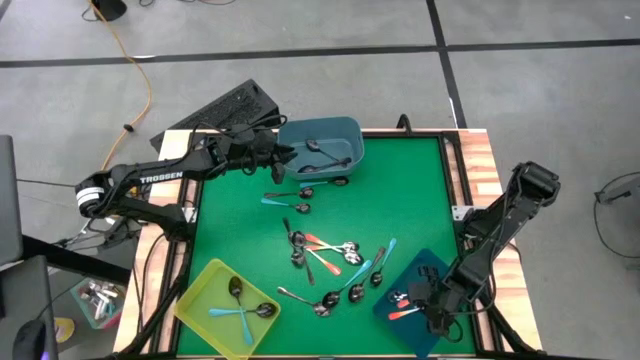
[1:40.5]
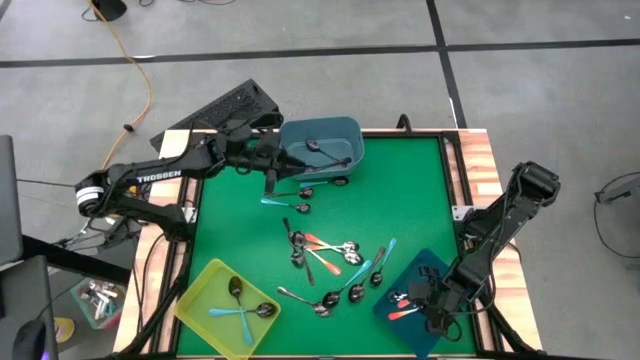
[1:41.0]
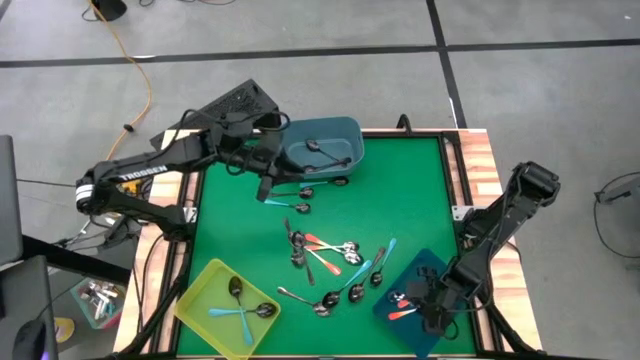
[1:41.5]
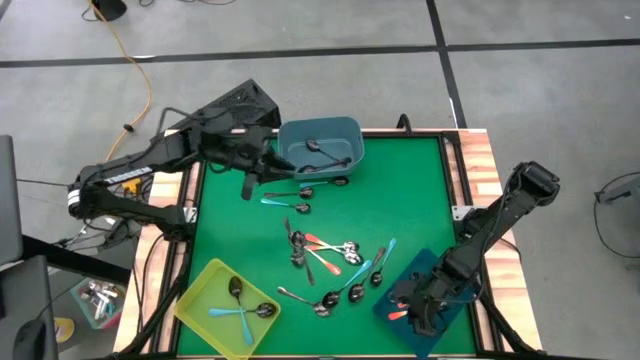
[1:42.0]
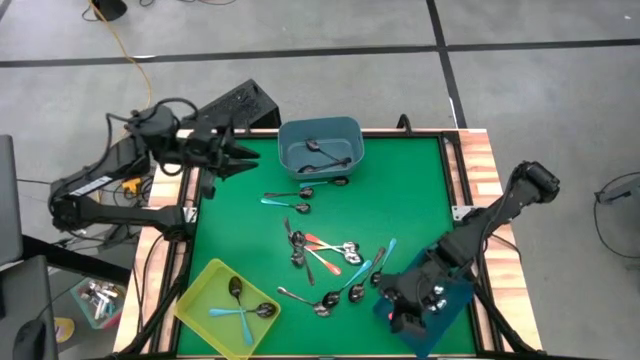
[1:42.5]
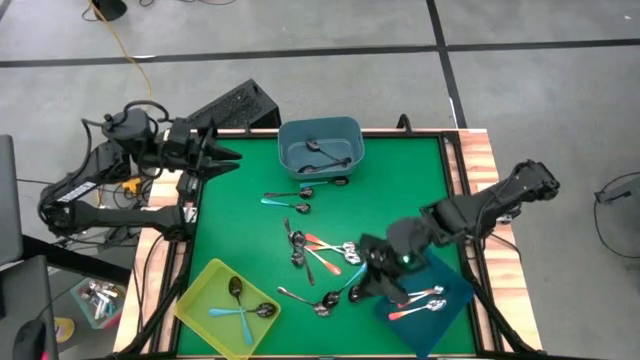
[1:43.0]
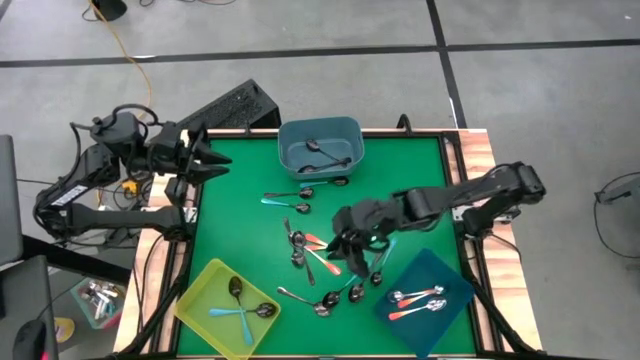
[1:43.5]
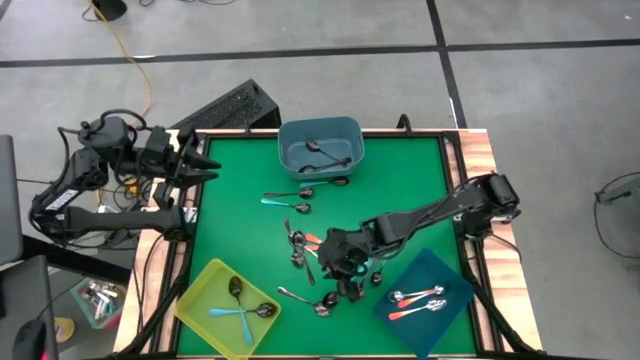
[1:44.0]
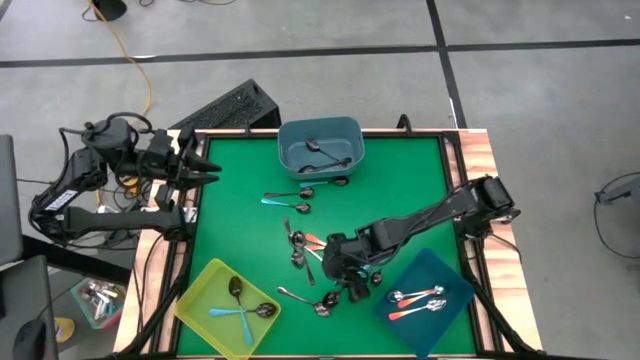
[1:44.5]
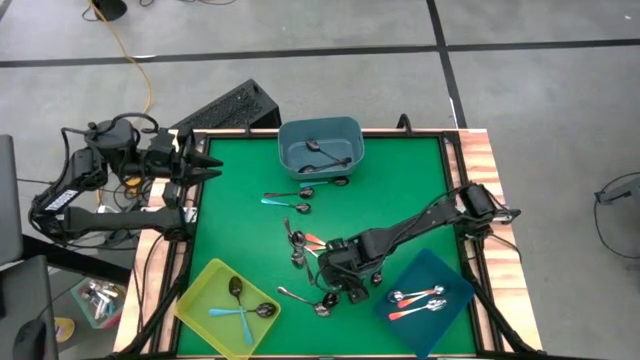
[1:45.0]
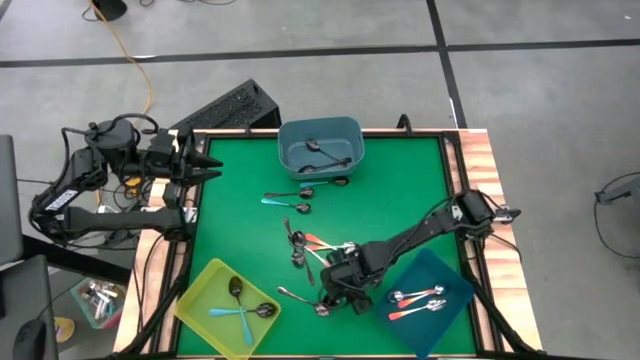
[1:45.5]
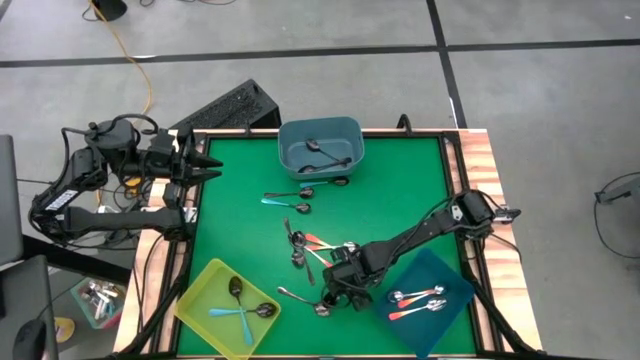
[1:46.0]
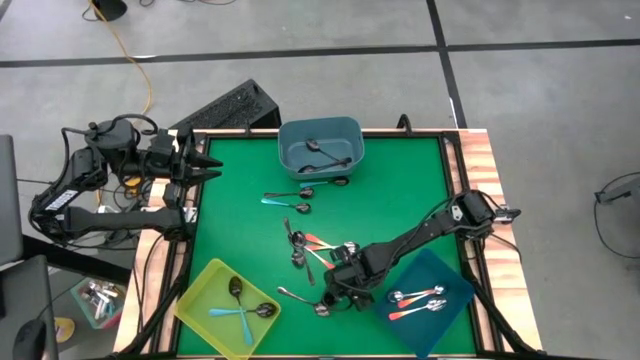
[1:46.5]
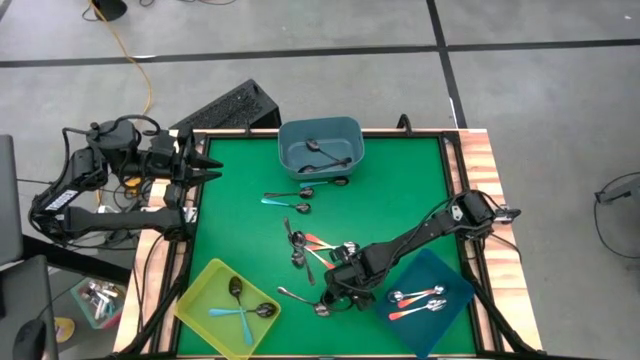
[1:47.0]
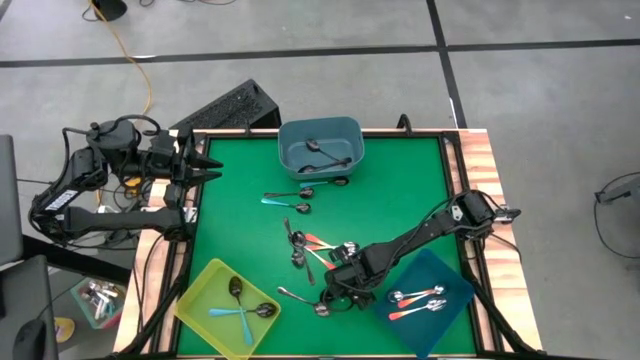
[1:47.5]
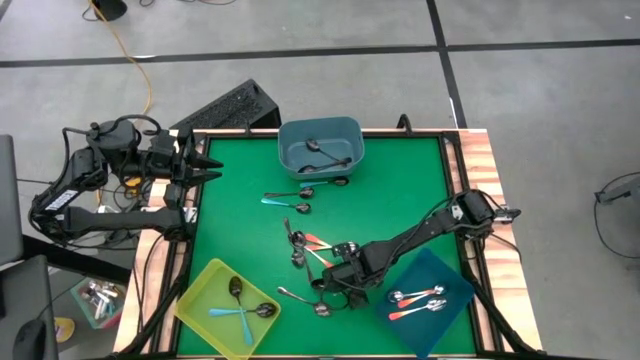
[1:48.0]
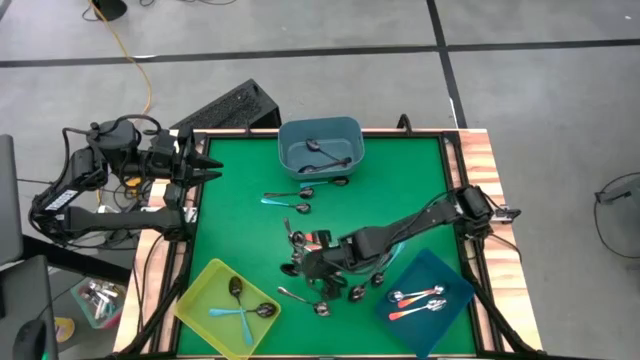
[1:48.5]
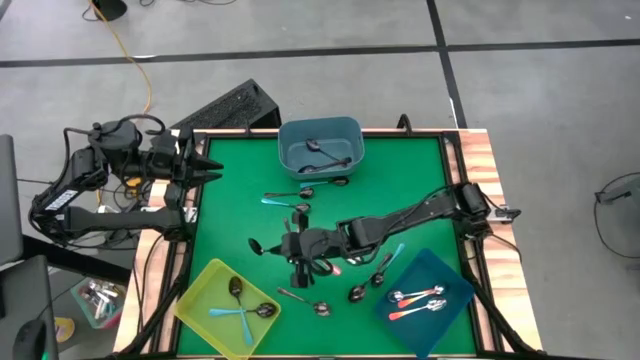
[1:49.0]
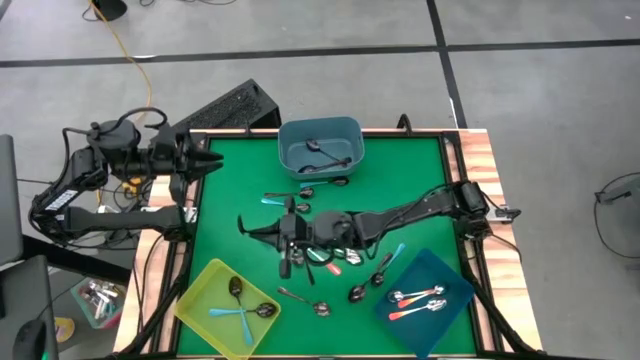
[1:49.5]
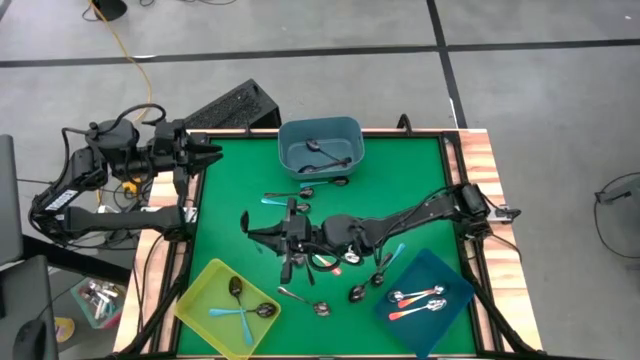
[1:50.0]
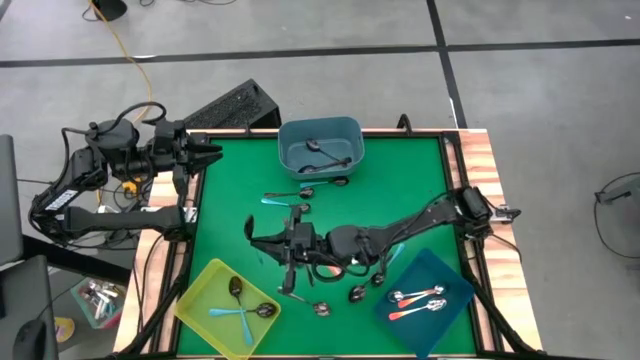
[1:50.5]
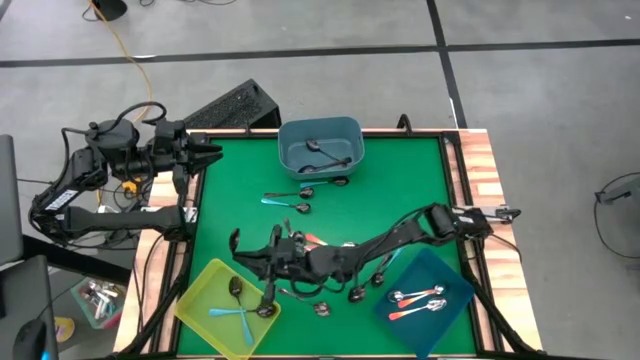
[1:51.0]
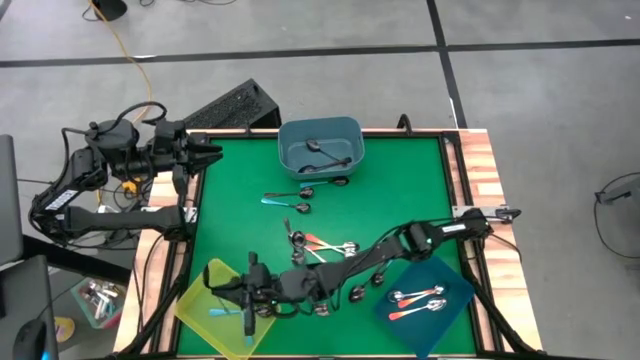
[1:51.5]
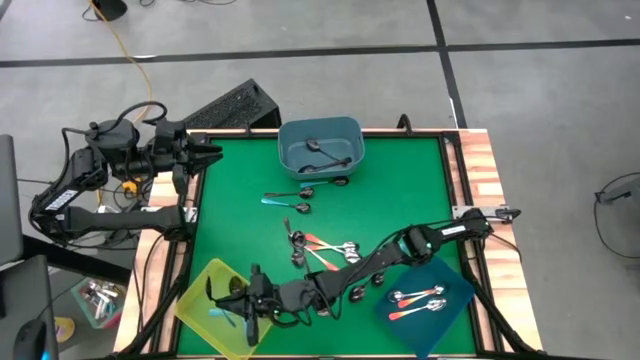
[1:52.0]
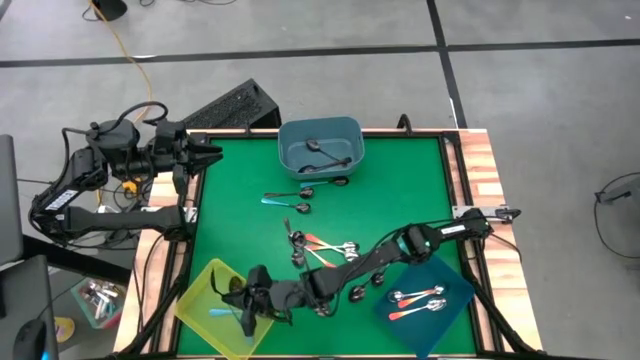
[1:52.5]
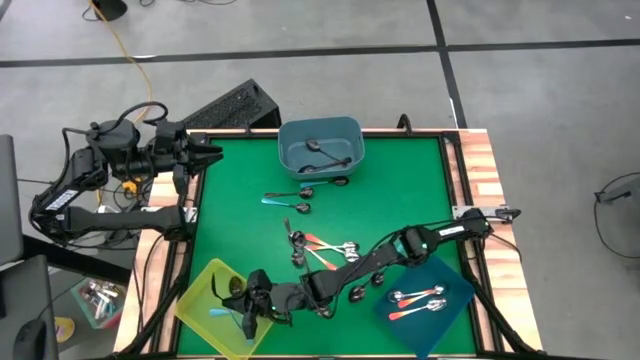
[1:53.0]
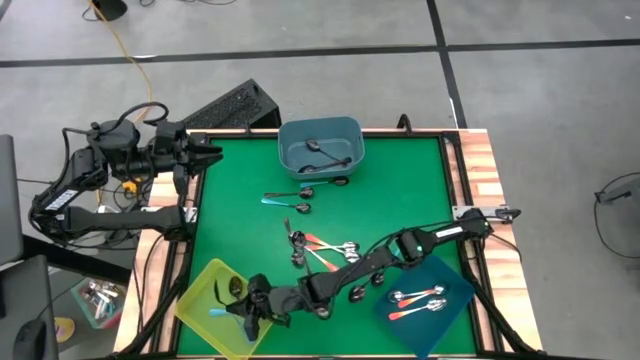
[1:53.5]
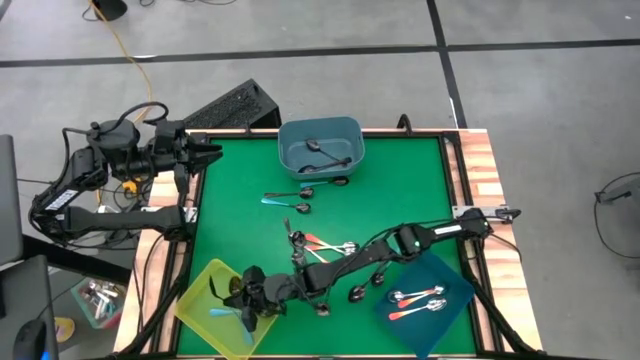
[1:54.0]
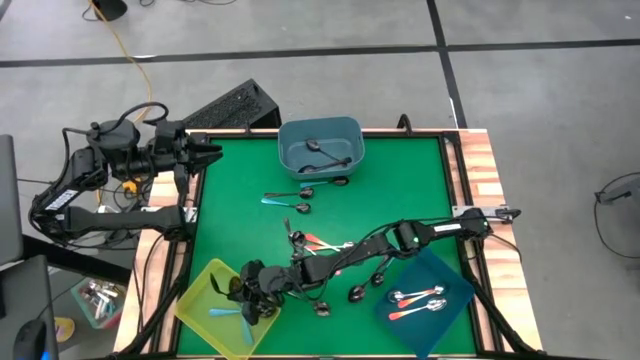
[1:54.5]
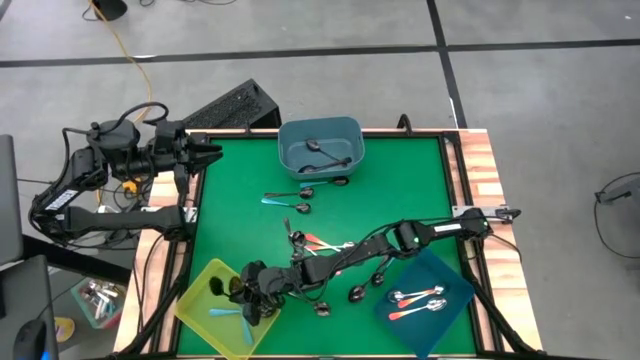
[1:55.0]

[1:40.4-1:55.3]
Task: Sort silverware by color (type)
Put the light blue spoon into the yellow bin

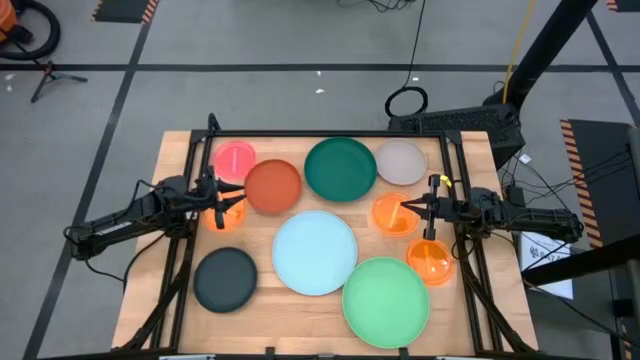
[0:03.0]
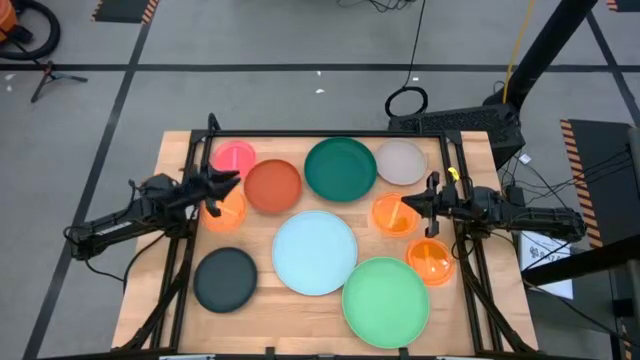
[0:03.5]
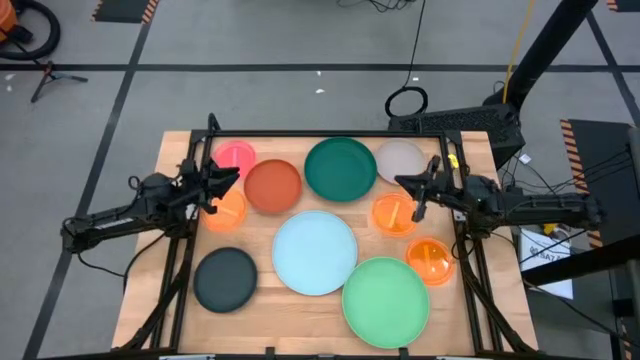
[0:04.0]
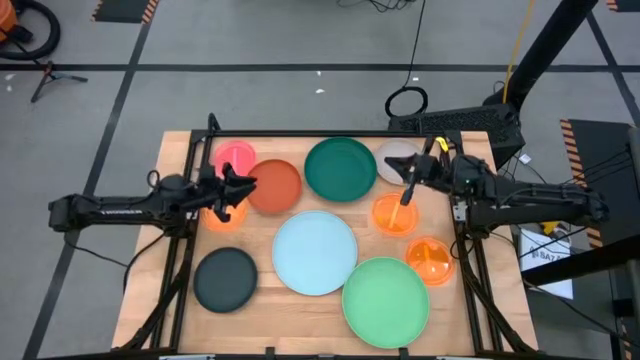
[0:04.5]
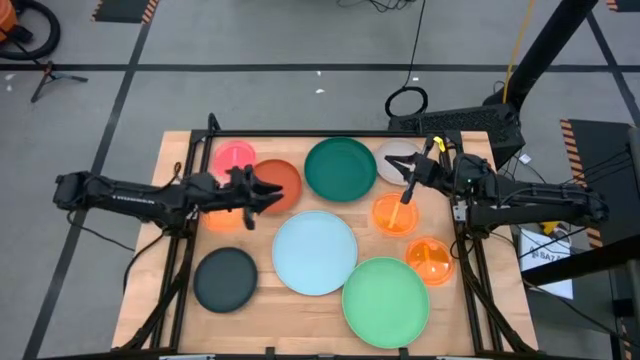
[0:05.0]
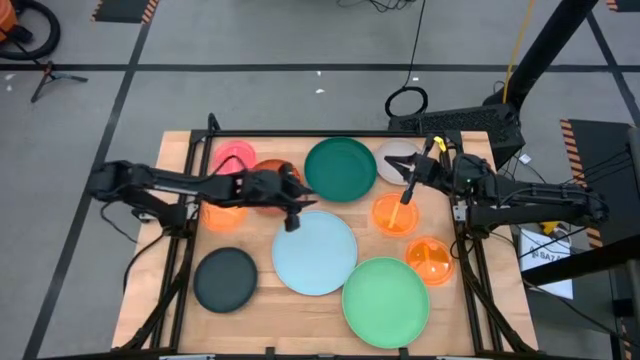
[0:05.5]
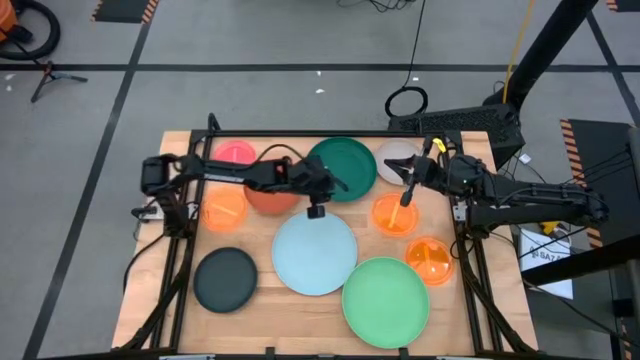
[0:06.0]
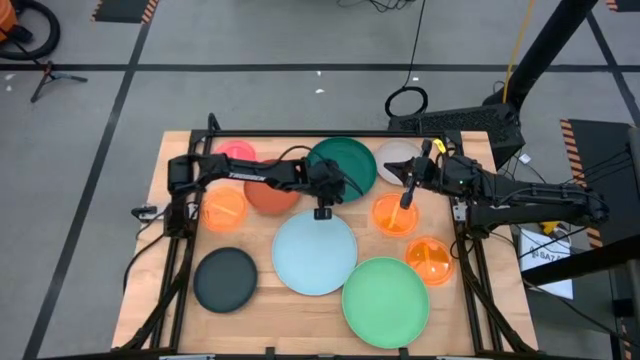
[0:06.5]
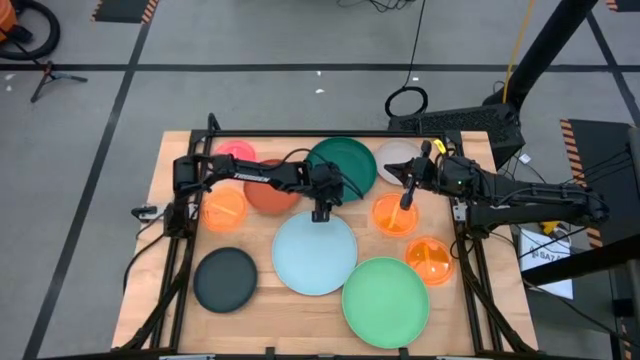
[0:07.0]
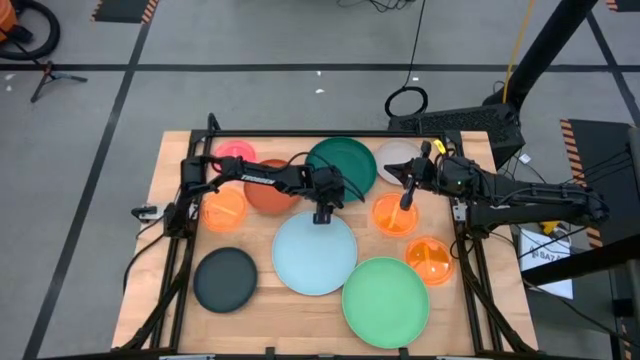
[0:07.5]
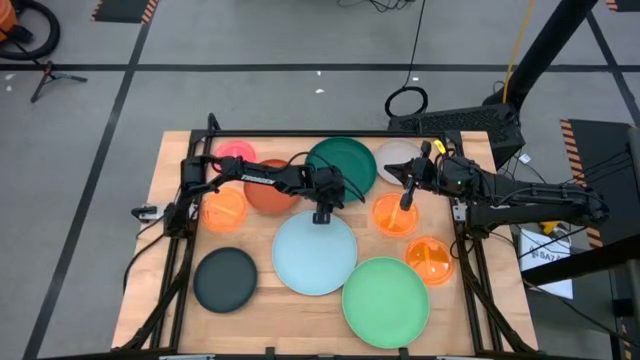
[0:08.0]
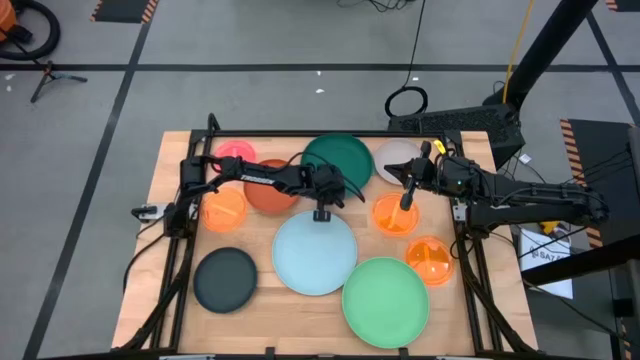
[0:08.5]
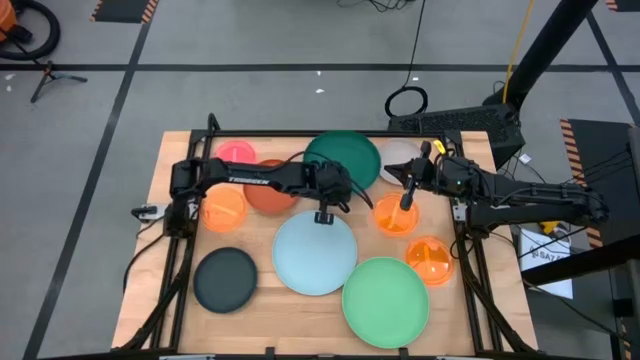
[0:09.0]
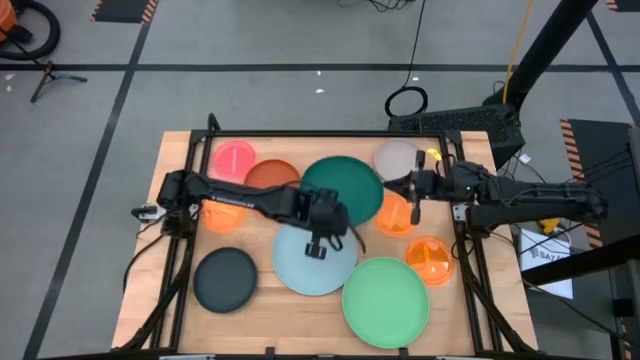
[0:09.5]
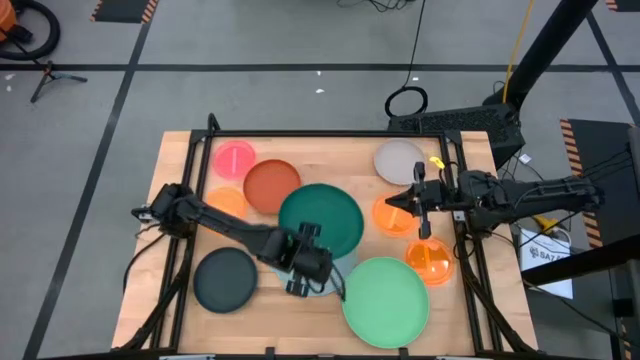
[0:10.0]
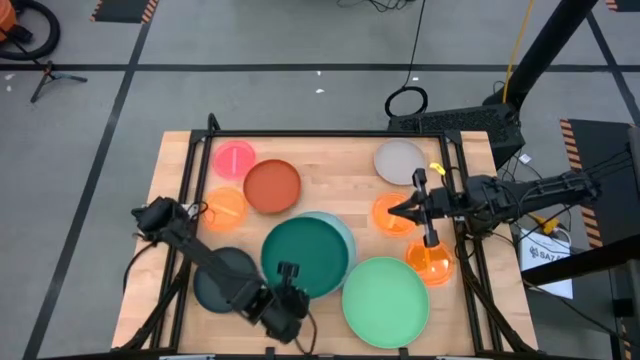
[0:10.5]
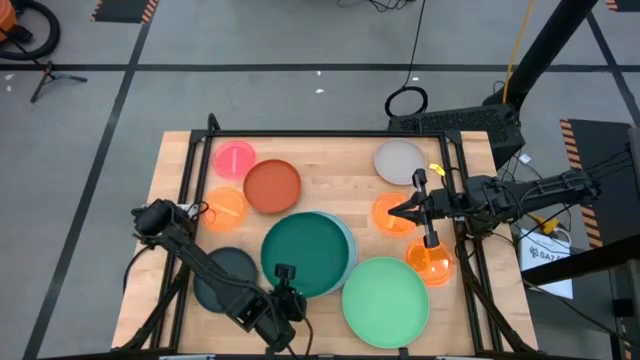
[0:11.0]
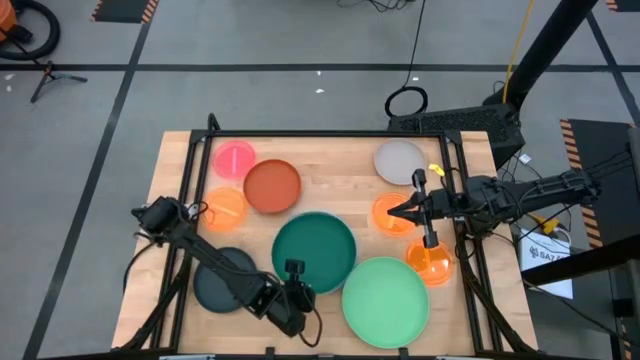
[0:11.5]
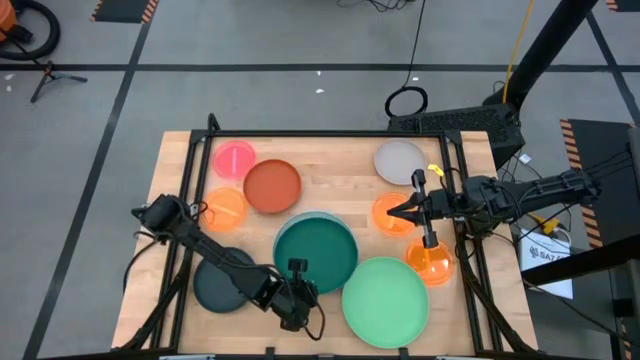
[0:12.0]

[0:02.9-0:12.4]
Task: Stack plastic plates
Stack the dark green plate on the blue plate
